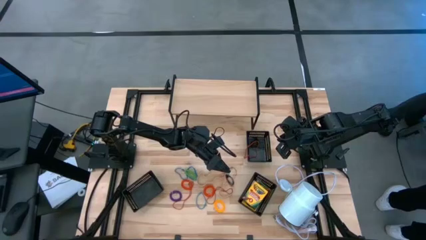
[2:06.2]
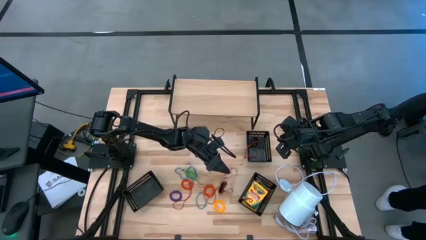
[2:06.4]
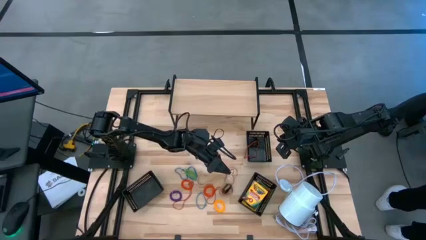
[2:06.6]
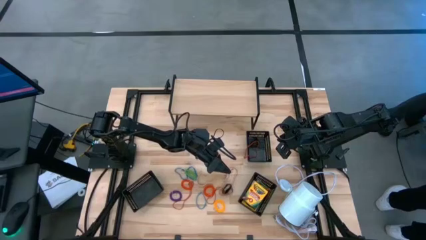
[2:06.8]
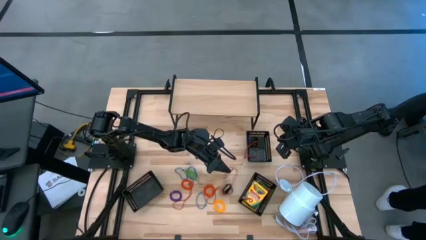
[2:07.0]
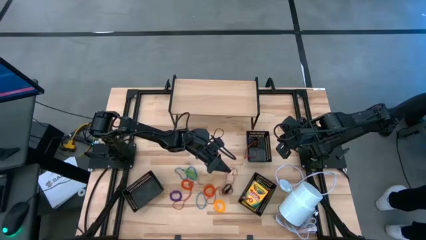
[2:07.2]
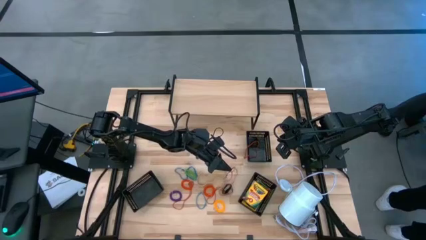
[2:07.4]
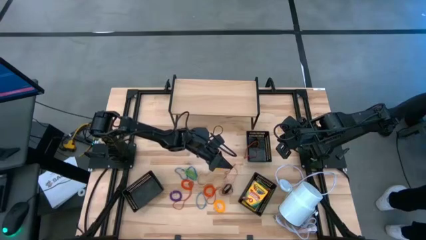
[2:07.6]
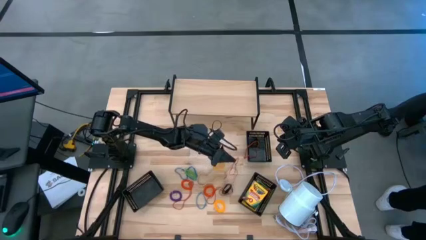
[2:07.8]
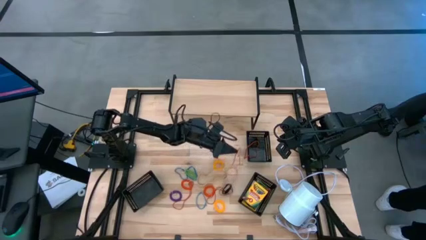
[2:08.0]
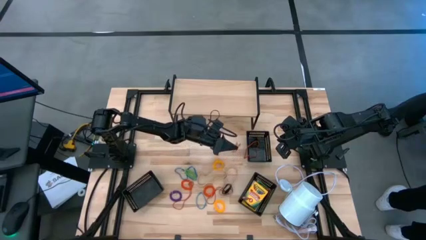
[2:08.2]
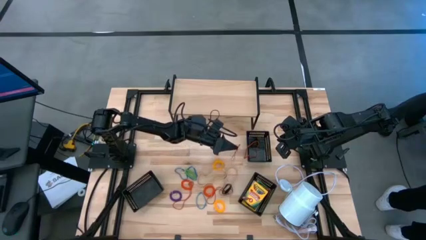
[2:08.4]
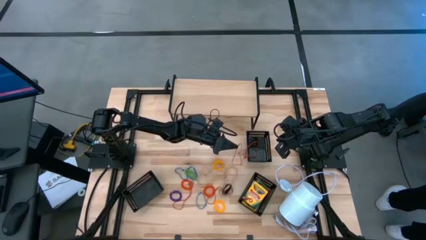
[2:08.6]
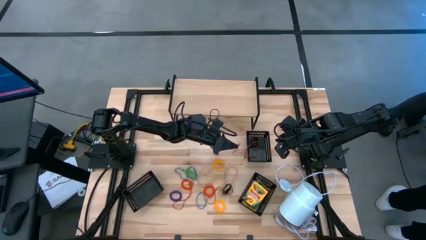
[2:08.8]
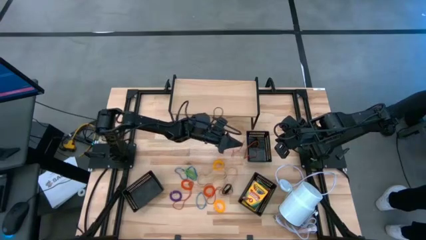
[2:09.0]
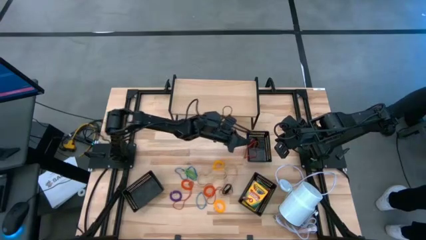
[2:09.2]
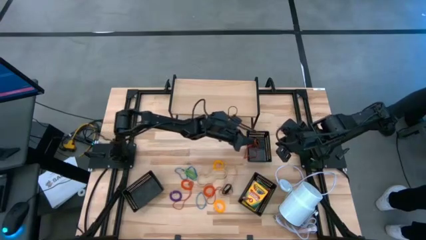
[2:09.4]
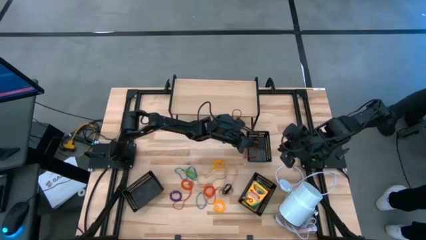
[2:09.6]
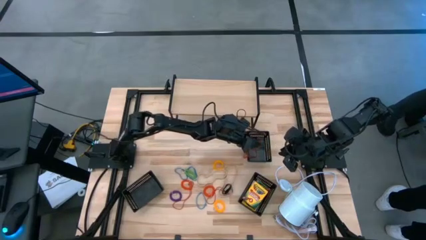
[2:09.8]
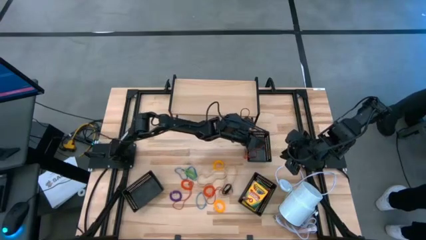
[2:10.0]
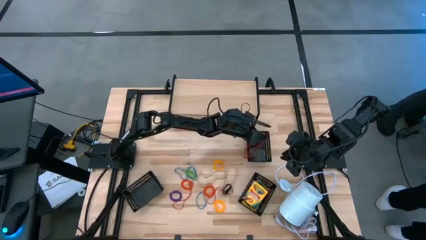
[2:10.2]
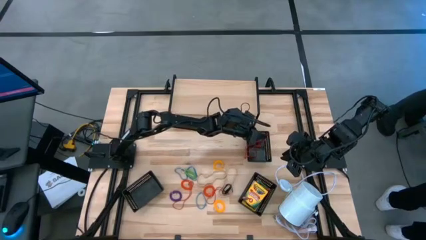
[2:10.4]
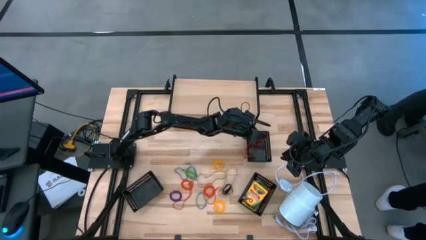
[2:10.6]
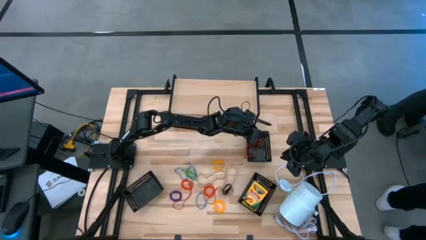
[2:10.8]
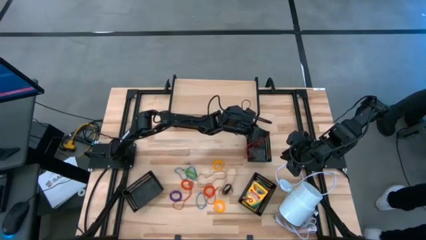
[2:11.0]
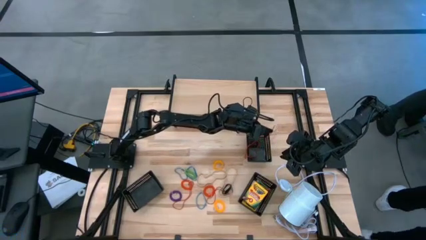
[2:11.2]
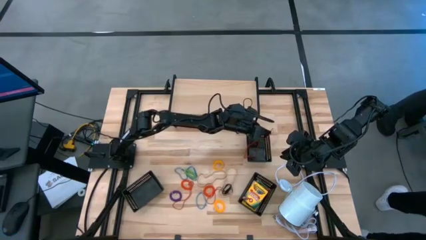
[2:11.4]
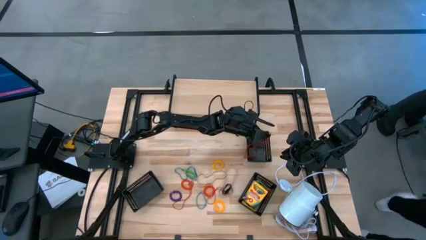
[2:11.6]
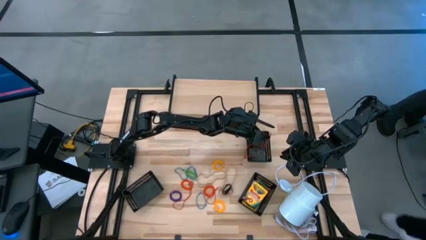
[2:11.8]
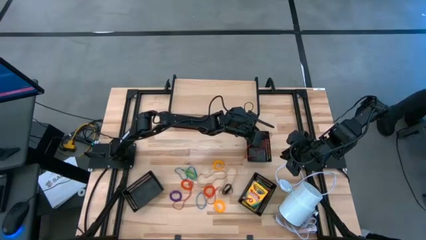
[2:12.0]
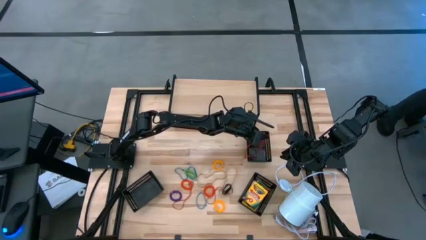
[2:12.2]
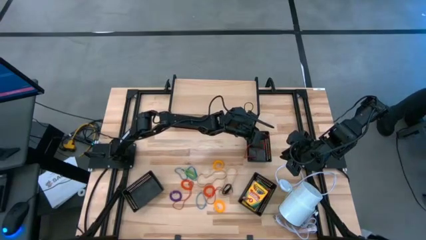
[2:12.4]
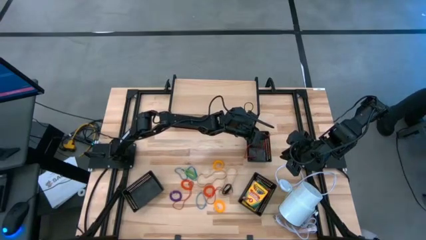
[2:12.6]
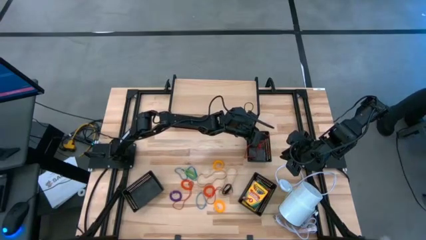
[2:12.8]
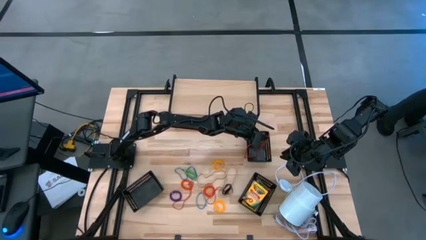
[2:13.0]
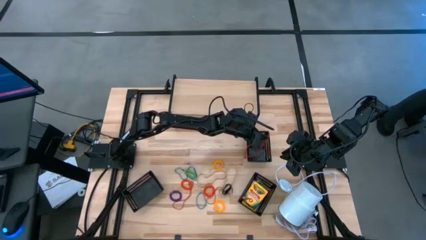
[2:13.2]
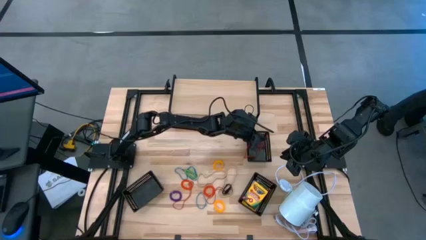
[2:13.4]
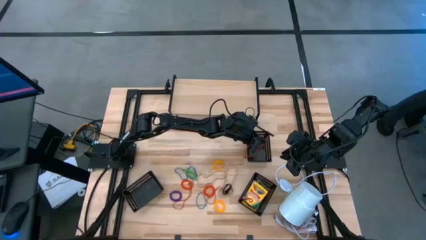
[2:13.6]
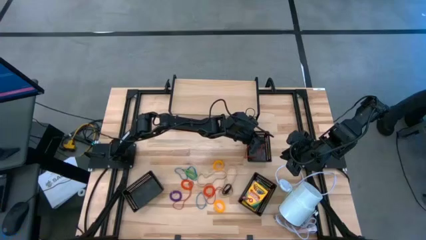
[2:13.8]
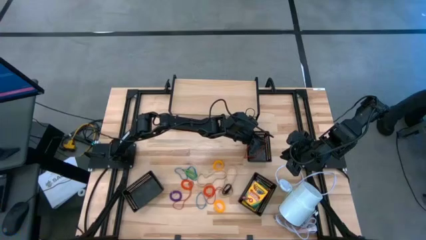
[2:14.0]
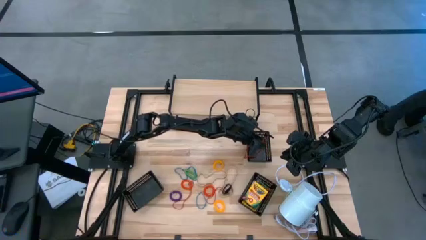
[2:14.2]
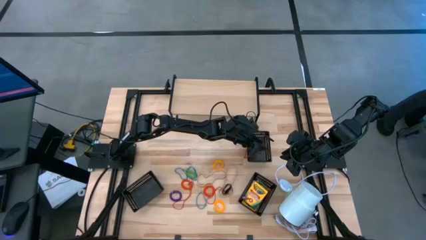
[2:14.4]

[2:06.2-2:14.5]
Task: Pick & Place Office Desk Supplies
Put the top red rubber band into the top right black bin

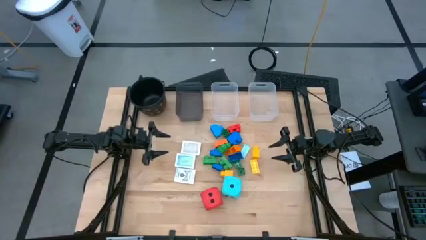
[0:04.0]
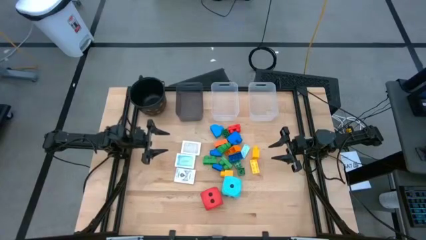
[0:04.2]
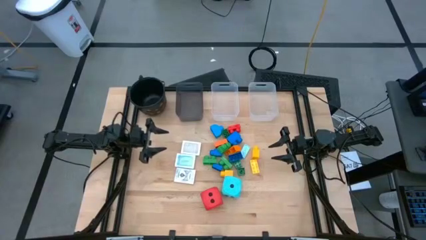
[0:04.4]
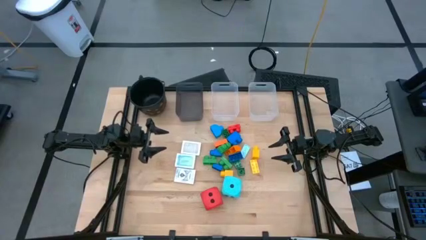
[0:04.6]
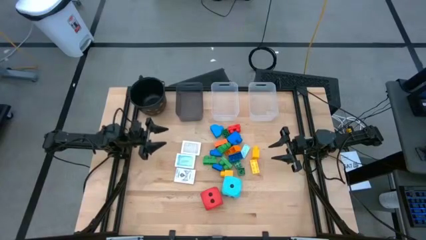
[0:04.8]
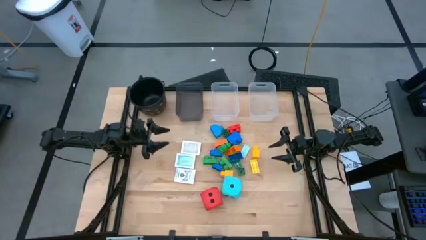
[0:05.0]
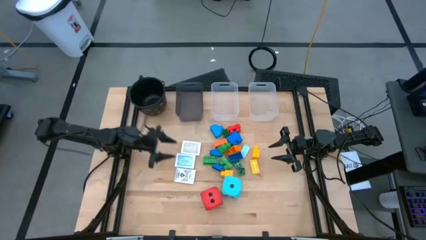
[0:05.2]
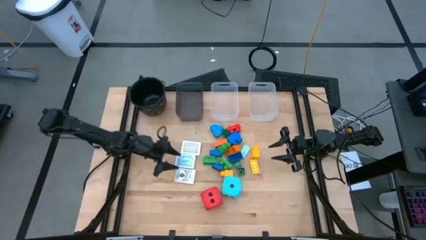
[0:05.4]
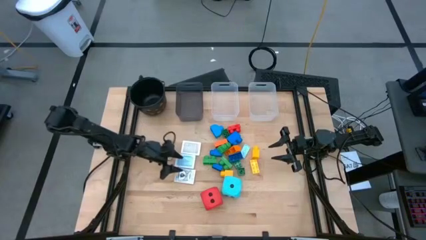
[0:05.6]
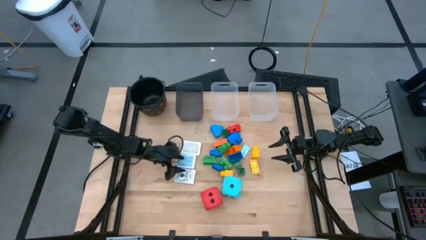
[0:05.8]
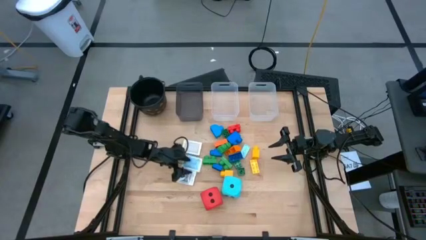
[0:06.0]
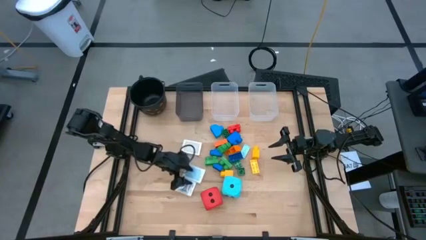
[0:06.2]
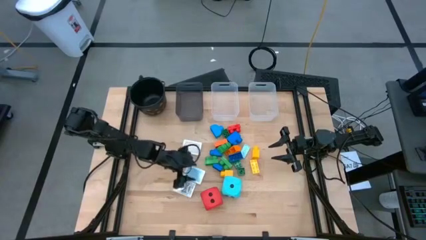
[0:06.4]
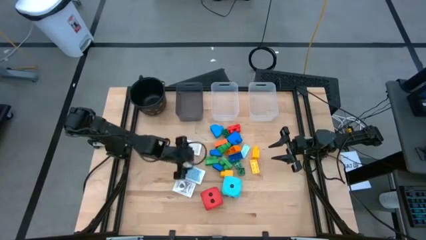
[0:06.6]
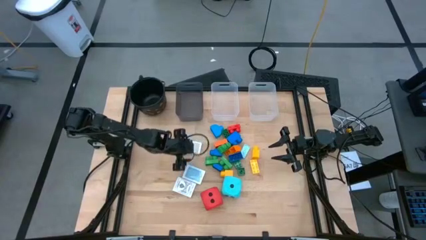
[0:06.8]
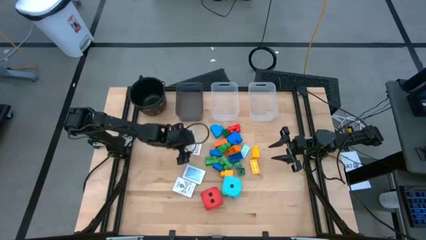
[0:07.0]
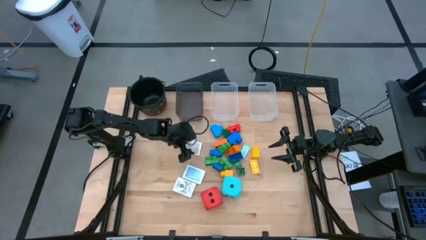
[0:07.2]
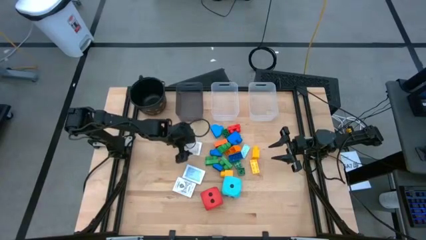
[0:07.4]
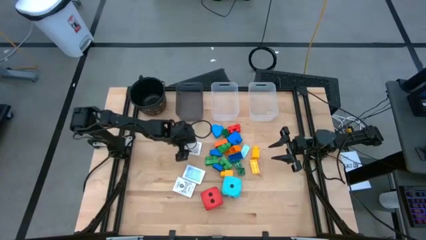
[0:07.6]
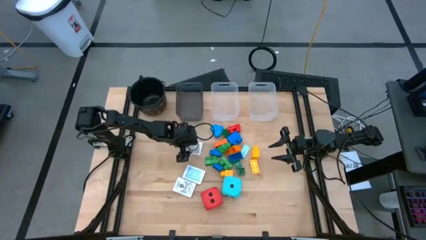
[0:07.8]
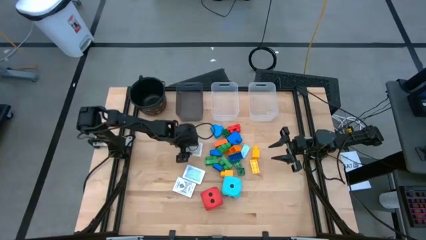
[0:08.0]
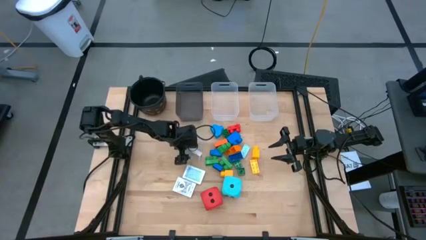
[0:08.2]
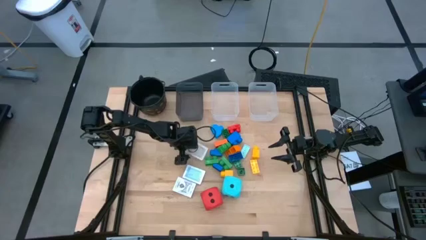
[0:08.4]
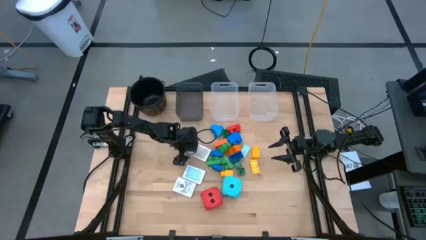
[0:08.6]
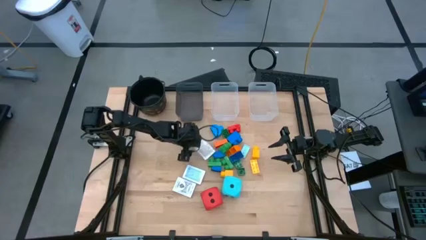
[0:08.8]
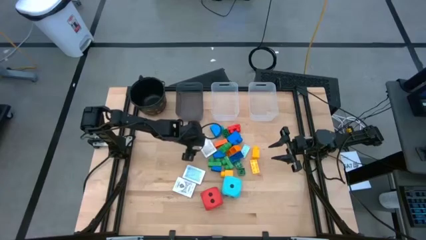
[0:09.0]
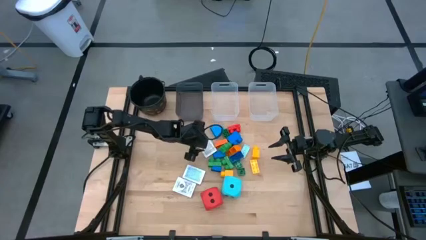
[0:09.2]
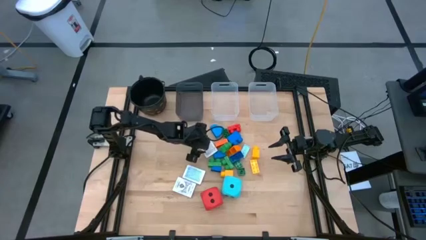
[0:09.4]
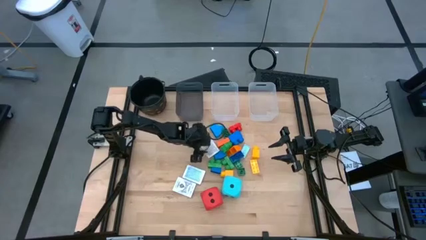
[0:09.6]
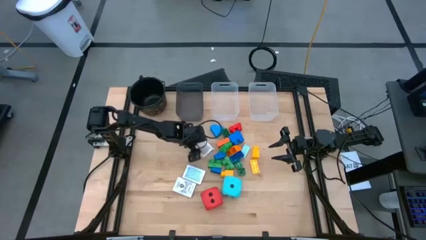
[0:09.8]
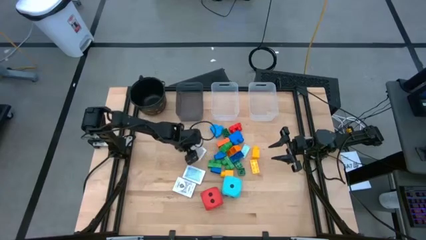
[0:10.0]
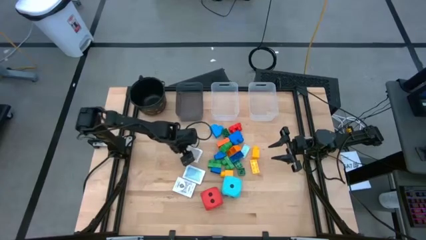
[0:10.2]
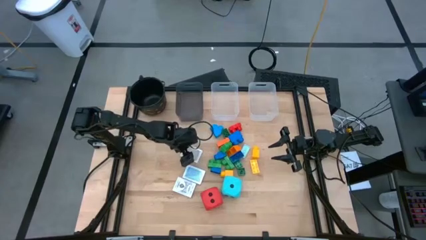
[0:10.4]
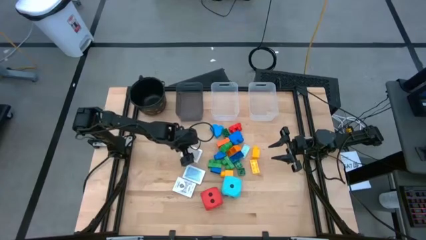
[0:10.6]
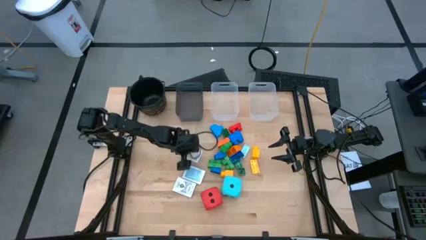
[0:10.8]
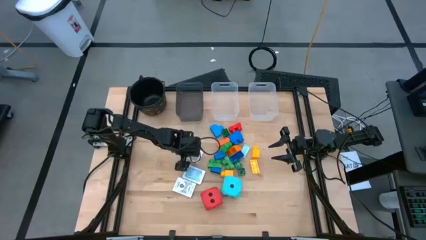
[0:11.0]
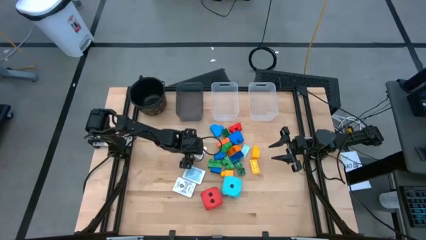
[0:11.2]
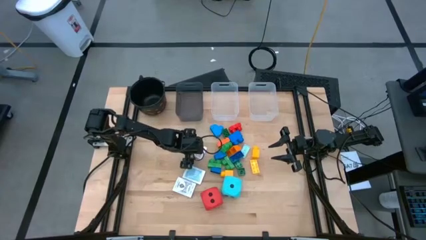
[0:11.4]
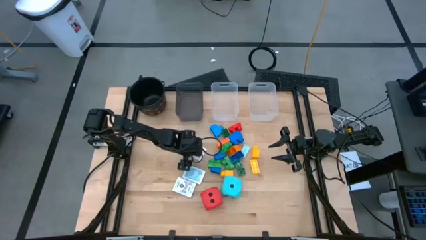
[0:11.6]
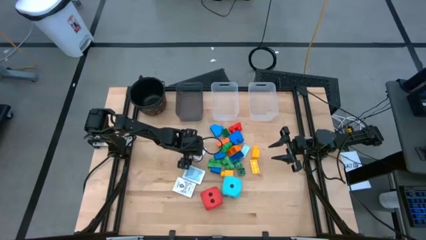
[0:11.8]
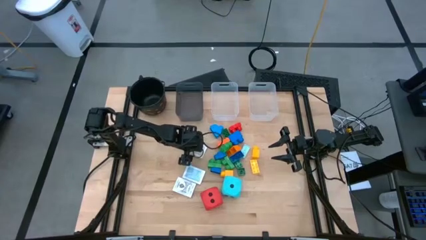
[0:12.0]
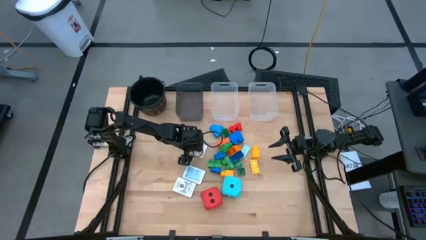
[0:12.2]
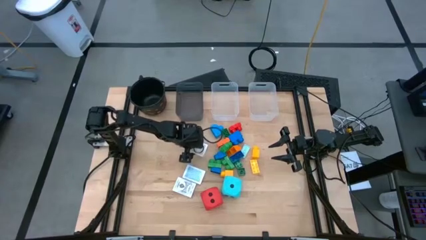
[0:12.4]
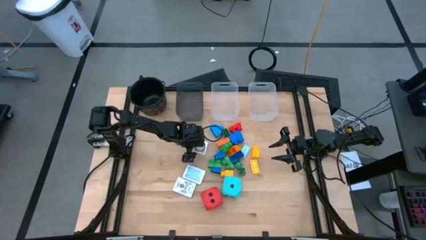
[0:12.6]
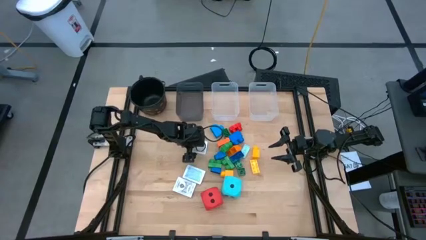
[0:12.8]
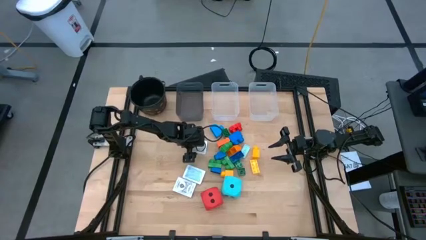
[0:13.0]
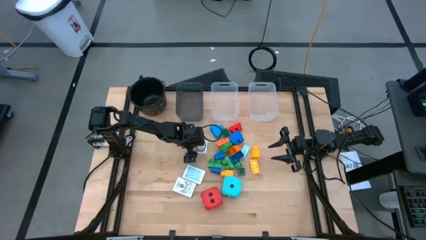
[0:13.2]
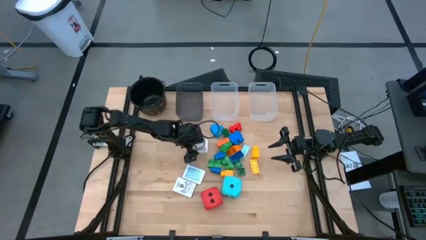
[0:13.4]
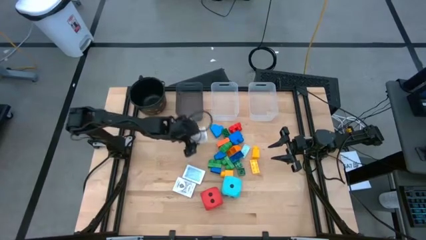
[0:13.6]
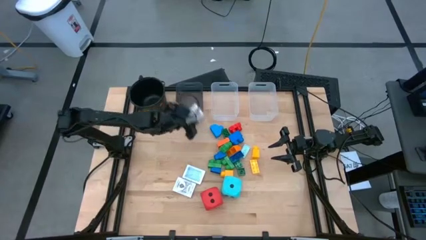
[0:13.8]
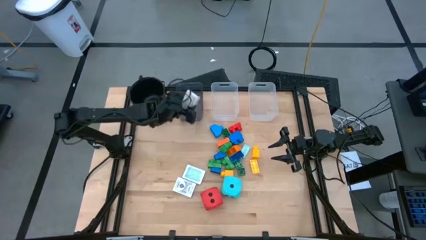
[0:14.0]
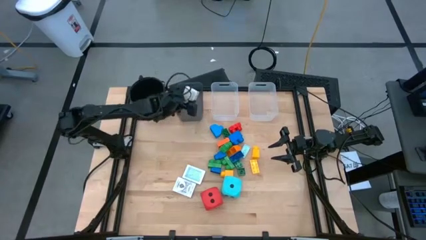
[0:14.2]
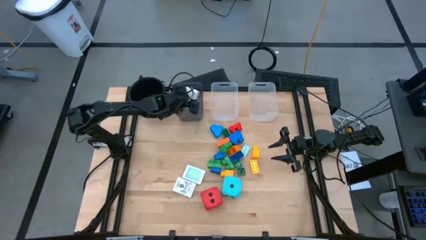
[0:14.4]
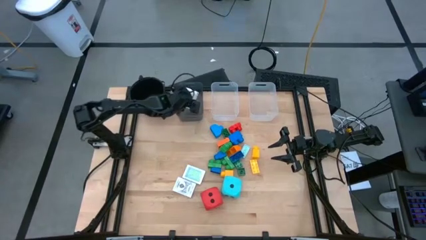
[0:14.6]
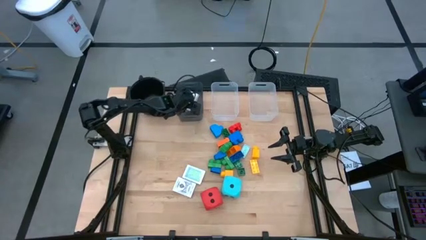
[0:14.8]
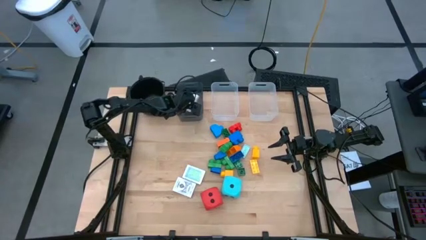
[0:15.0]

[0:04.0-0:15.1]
Task: Pick & Place Toys
Put the playing card box into the black bin
